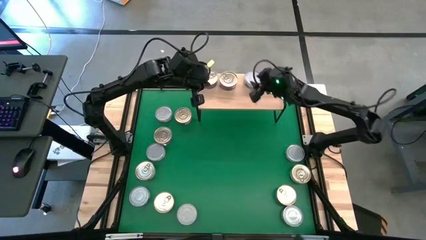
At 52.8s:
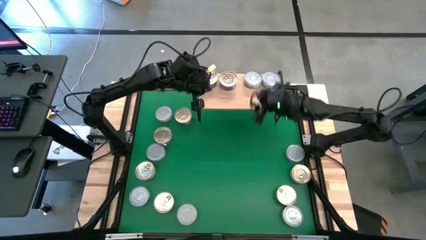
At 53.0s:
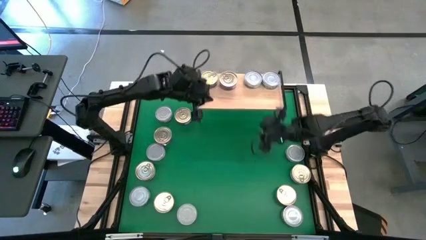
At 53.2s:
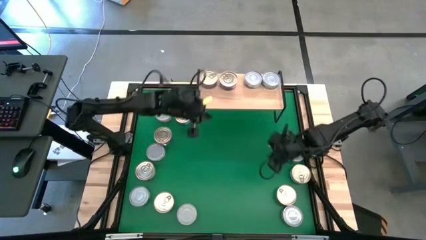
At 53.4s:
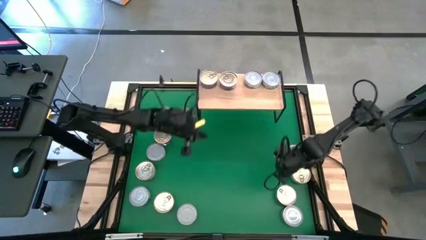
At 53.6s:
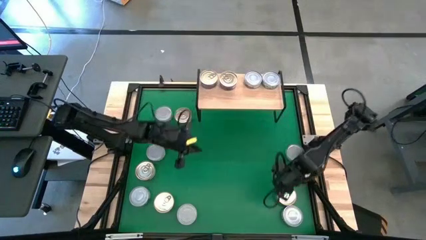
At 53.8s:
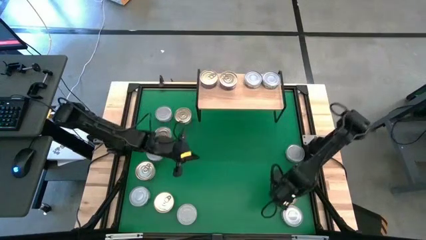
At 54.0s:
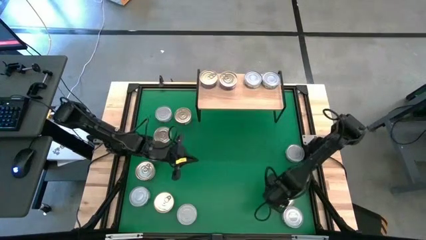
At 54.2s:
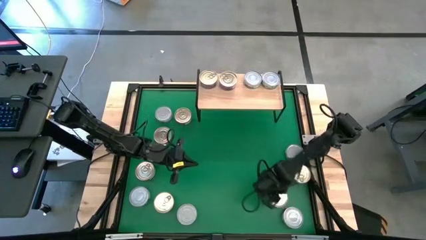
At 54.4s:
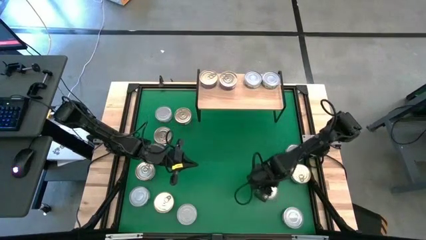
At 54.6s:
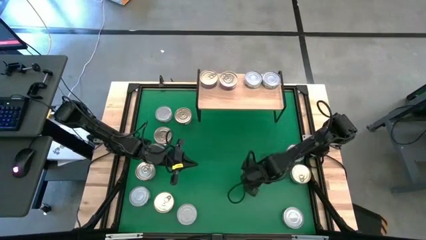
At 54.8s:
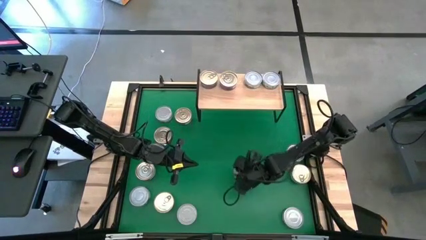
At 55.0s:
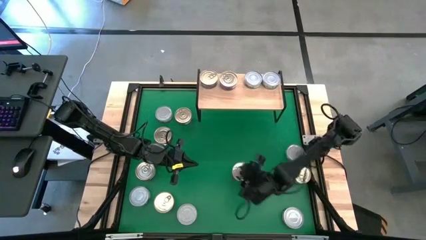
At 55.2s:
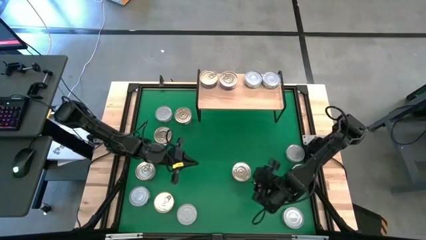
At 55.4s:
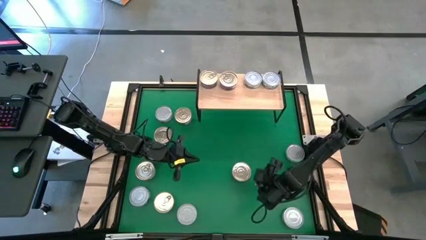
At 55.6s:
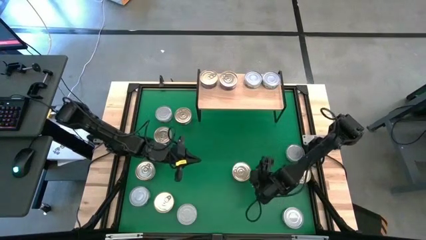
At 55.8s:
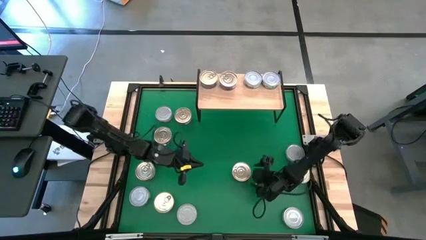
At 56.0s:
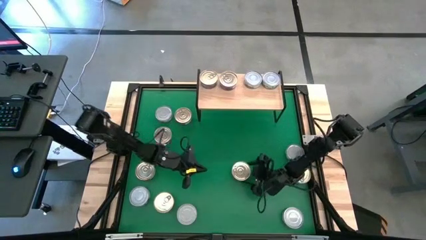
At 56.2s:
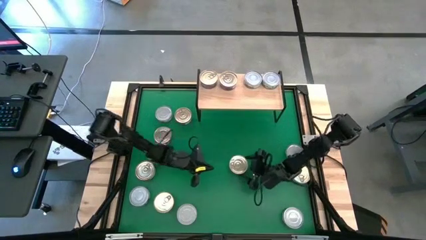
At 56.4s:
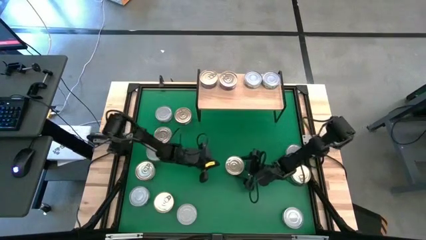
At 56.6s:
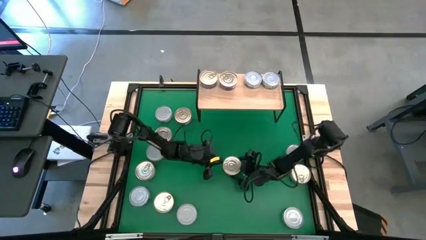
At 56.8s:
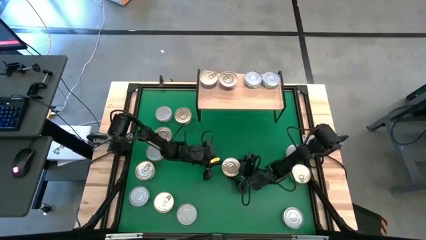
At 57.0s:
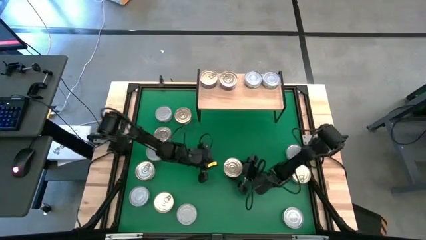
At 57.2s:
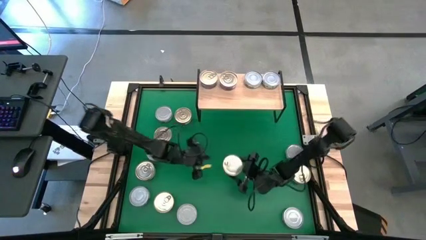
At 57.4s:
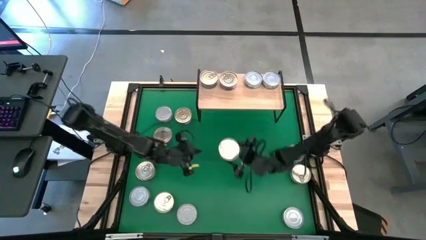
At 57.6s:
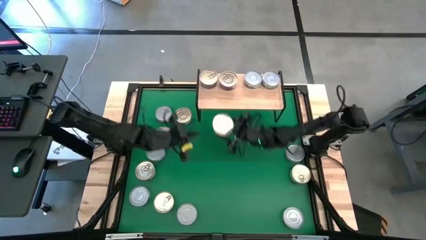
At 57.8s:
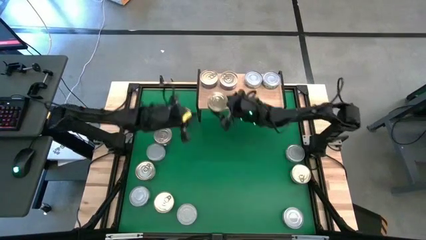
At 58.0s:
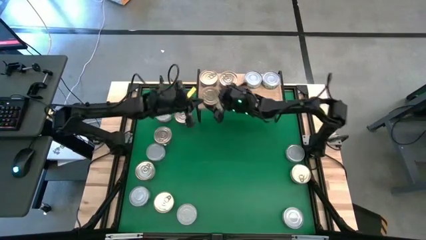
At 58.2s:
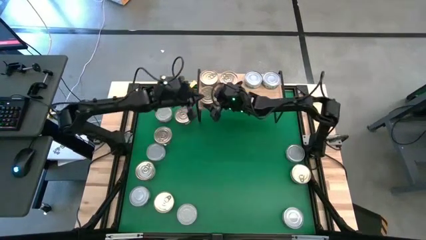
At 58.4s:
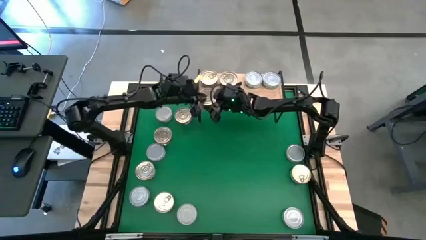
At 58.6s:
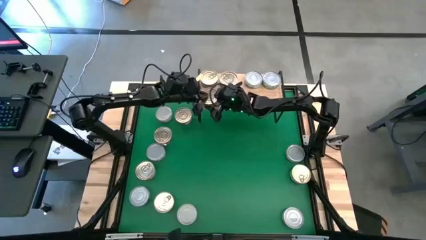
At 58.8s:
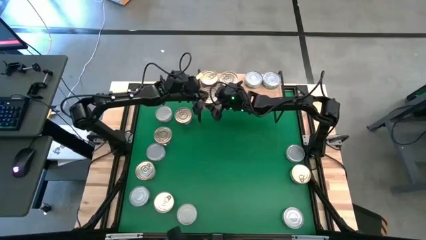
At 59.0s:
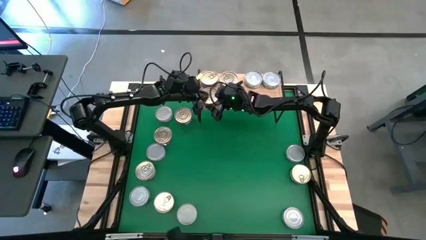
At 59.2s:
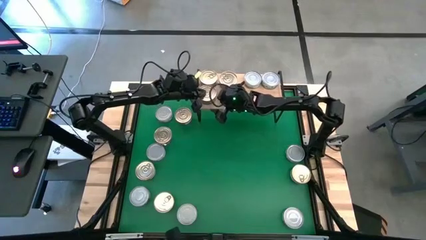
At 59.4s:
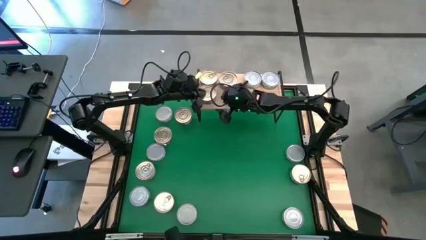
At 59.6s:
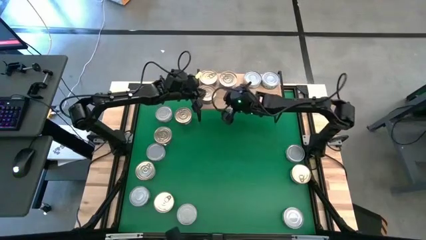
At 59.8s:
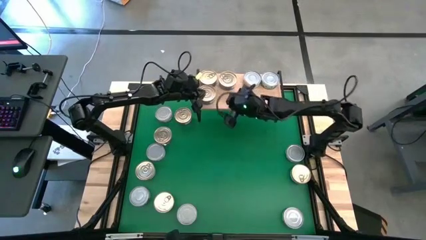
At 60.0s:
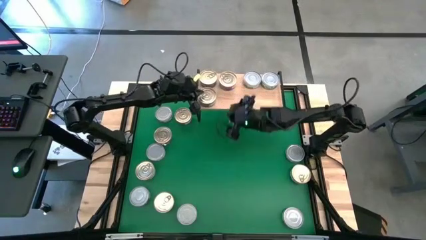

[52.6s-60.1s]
Task: Stack canned seafood by type on shelf
Put the blue pink tuna can on the shelf aligned with the top left blue pink tuna can

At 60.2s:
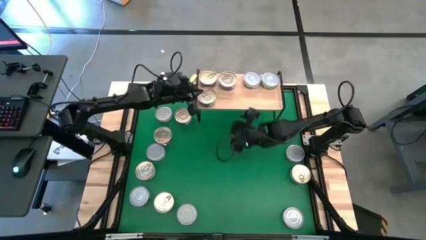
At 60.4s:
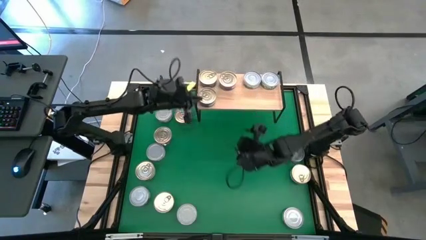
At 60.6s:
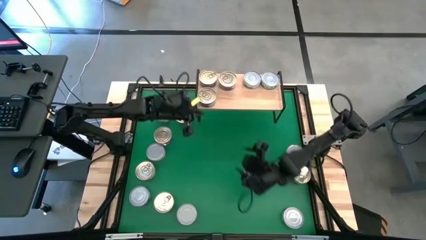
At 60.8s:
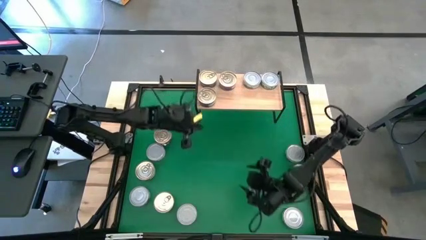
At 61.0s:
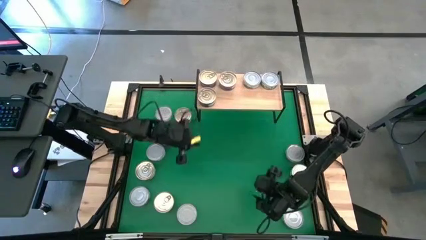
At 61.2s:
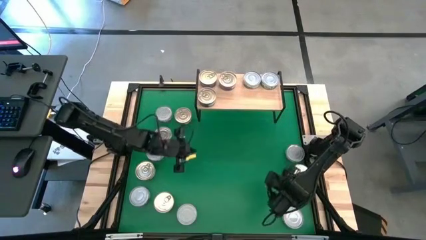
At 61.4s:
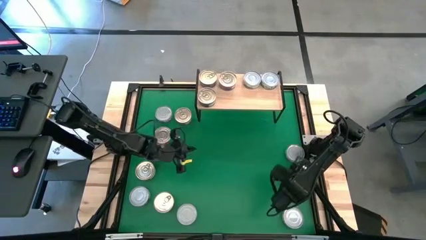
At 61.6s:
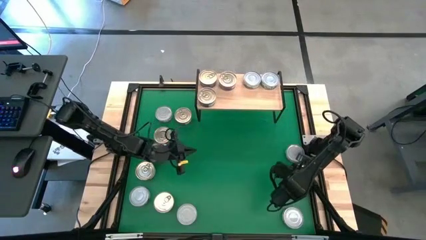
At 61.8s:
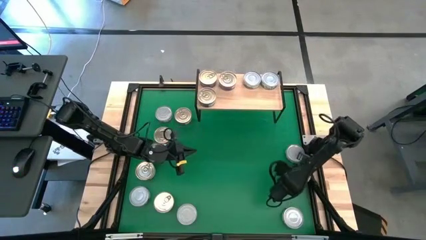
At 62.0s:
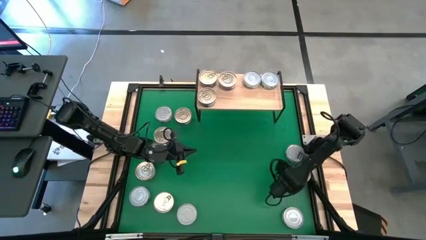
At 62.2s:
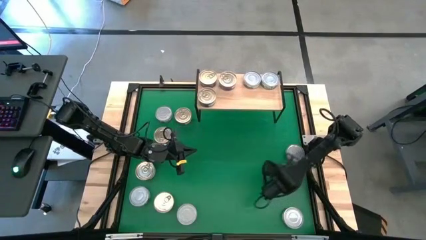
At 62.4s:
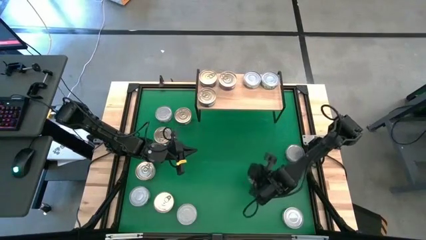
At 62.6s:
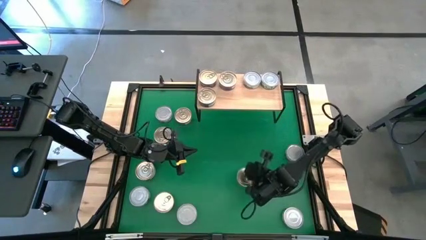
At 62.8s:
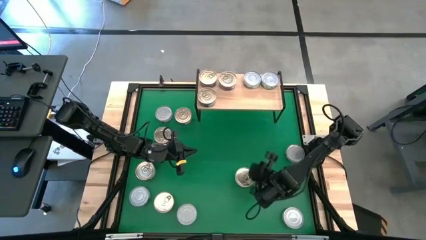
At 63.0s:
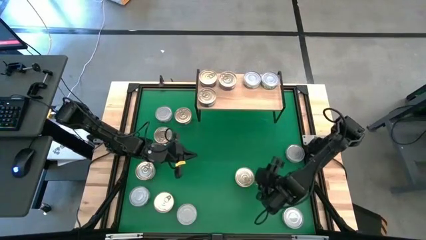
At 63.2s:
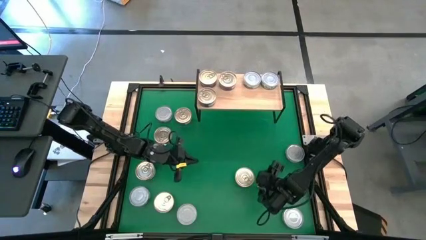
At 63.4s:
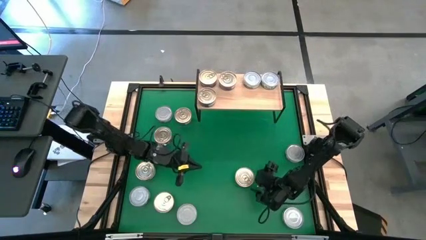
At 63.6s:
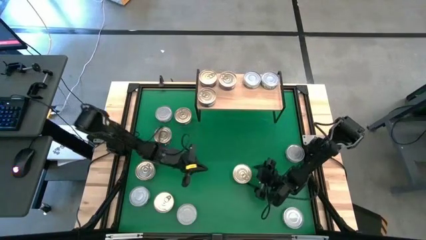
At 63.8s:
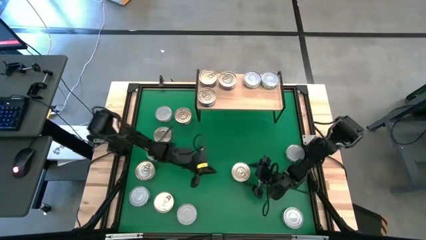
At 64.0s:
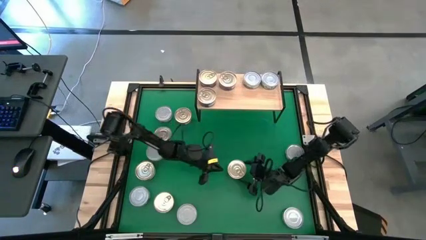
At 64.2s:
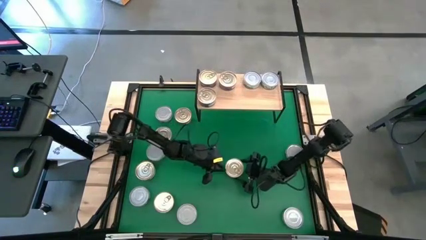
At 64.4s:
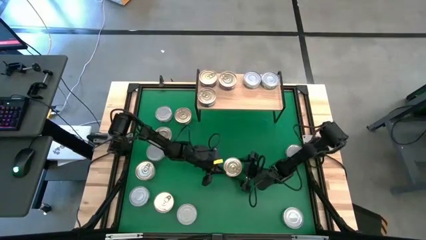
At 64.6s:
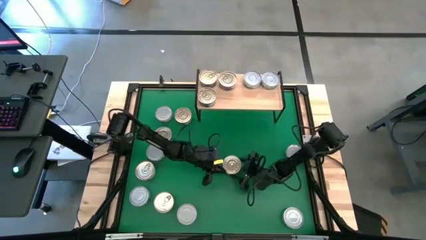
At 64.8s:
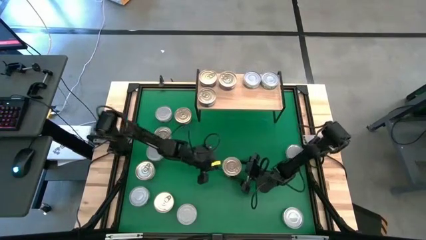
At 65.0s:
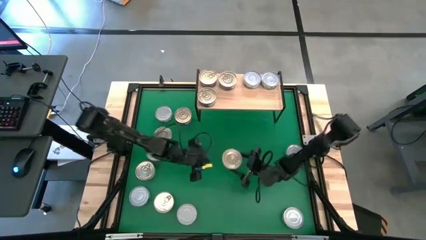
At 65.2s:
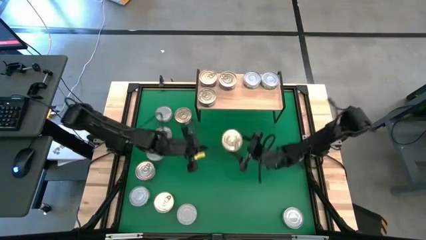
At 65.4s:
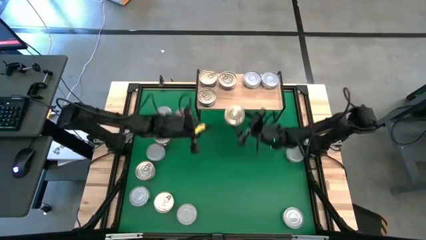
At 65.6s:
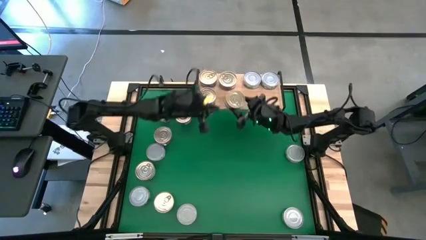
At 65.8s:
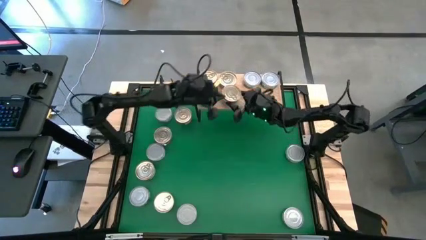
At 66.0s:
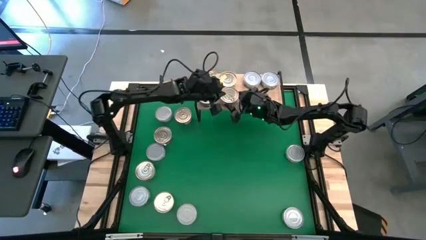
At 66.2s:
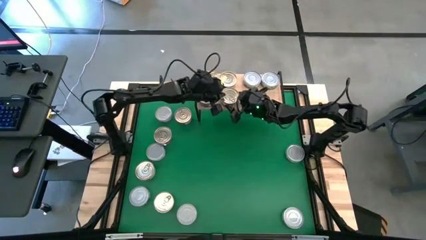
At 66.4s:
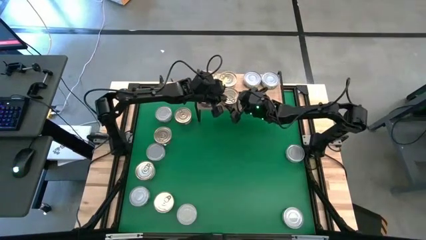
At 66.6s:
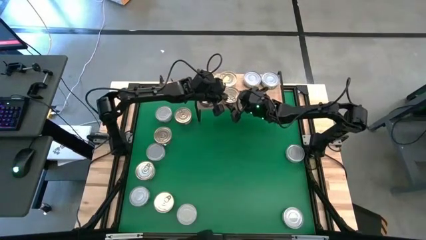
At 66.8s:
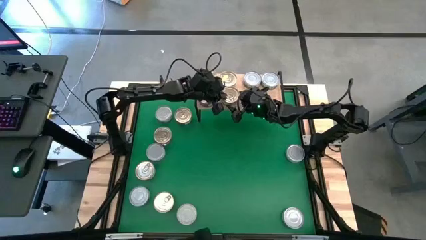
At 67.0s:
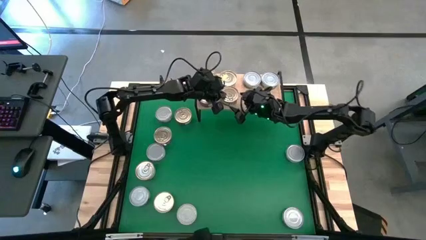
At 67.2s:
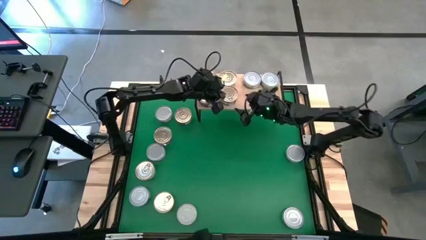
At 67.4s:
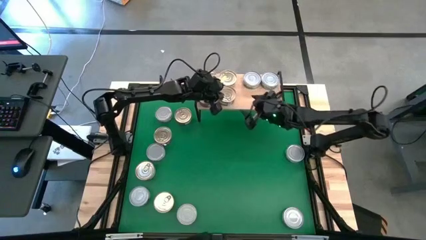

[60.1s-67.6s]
Put the blue pink tuna can on the shelf aligned with the top right blue pink tuna can

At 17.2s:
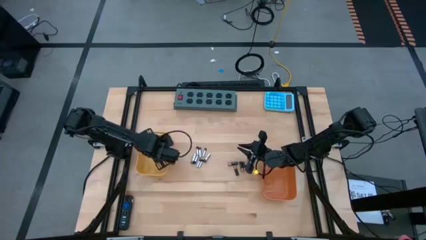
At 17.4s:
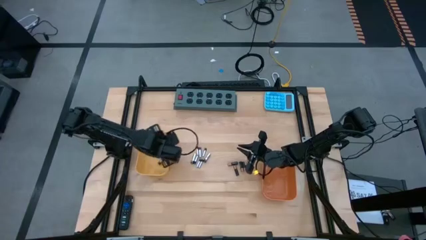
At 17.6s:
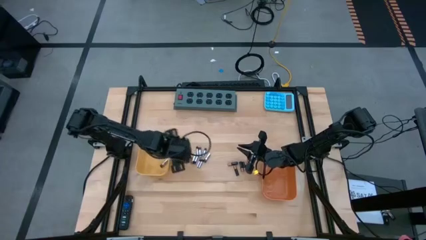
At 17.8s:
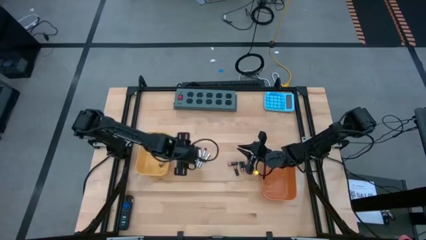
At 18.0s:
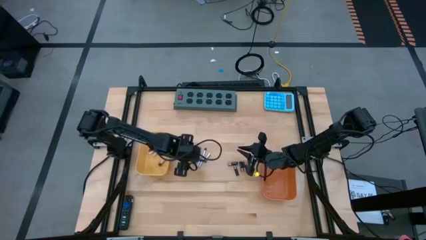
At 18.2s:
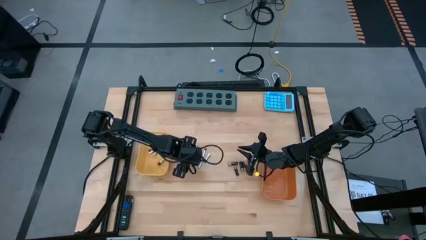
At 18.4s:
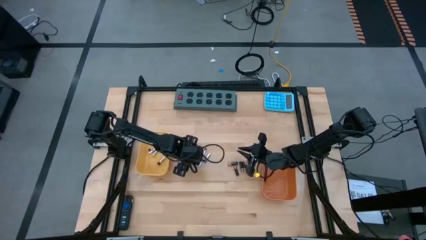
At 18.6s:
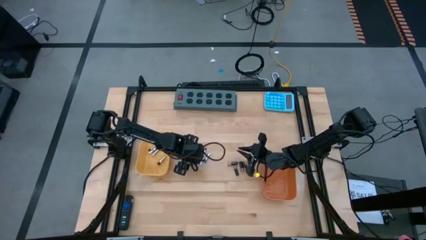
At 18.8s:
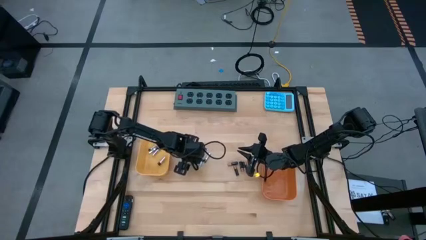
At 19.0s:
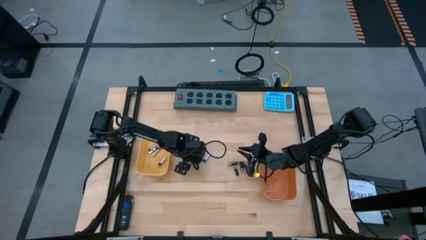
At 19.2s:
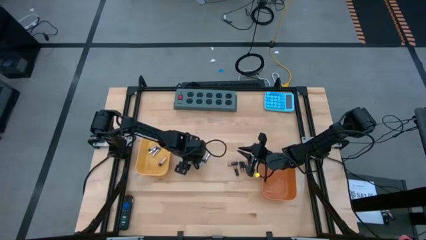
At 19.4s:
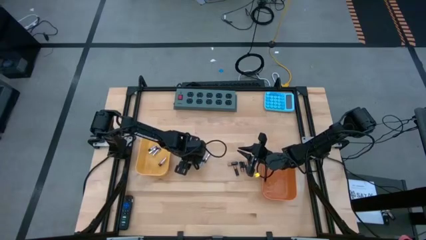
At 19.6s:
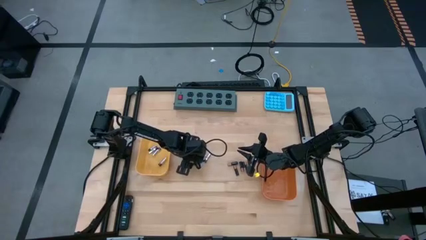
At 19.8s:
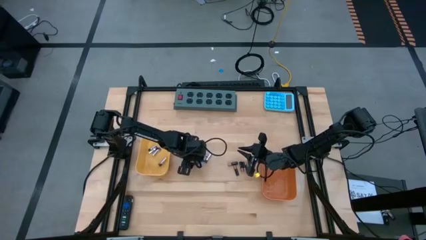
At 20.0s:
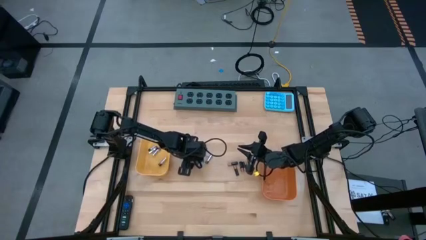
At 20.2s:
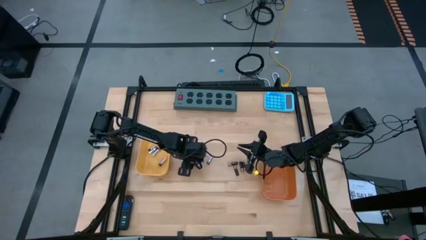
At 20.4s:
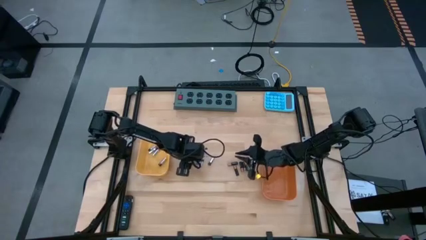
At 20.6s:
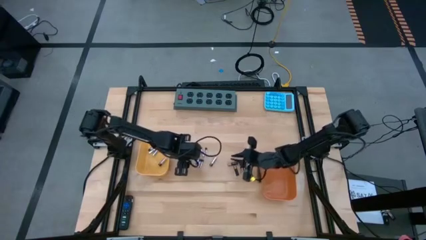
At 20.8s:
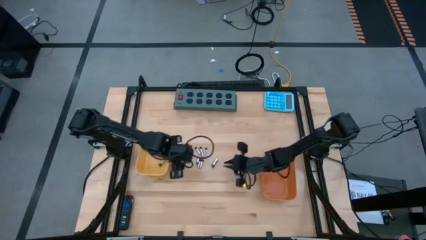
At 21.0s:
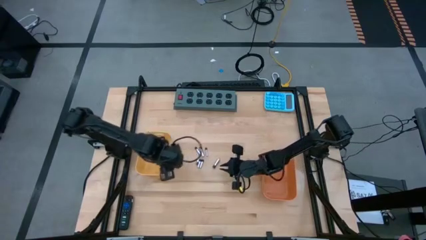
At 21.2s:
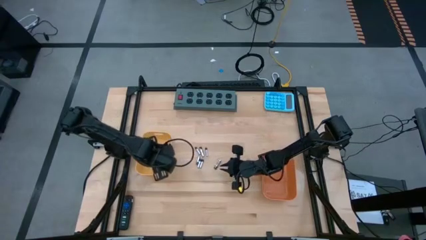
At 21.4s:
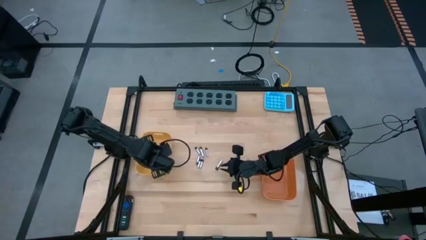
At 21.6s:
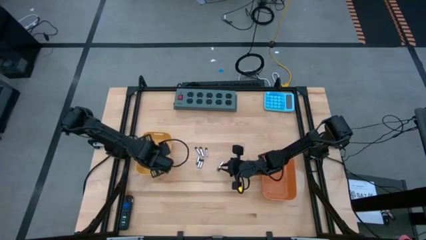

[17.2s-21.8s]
Task: Sort batteries
Put the silver battery into the yellow bin
